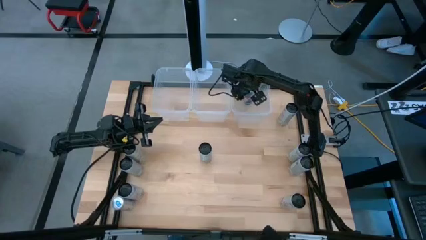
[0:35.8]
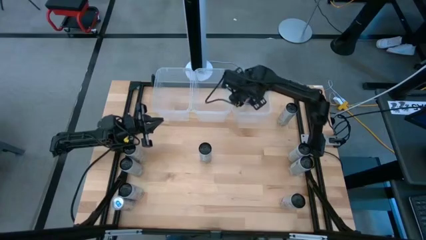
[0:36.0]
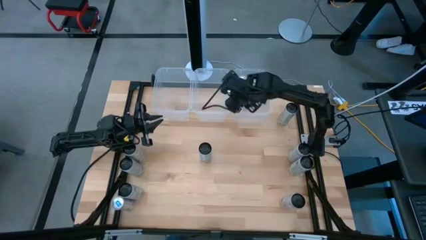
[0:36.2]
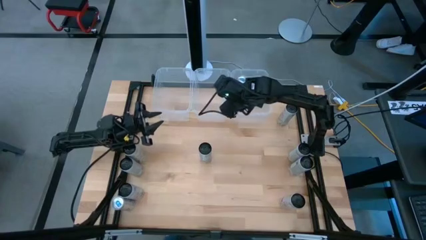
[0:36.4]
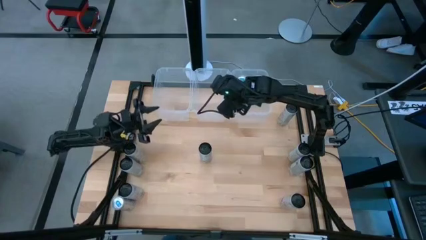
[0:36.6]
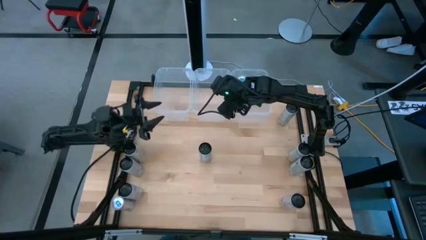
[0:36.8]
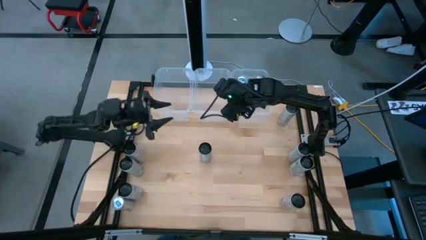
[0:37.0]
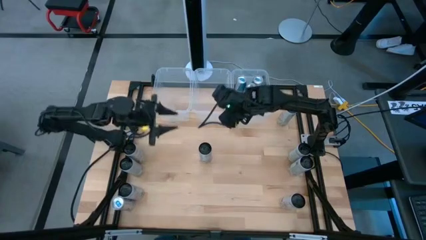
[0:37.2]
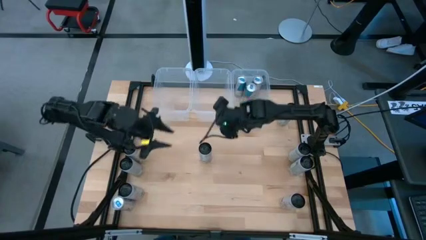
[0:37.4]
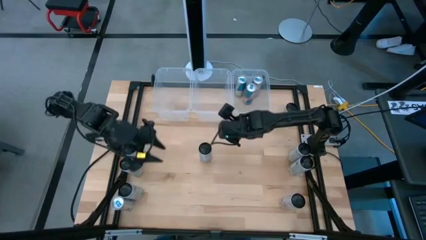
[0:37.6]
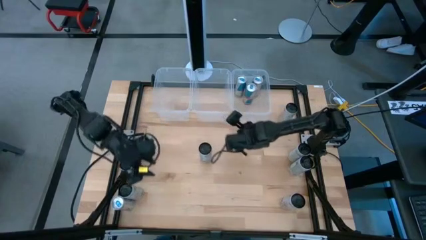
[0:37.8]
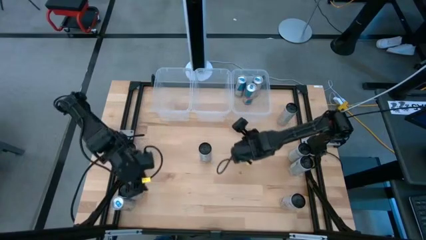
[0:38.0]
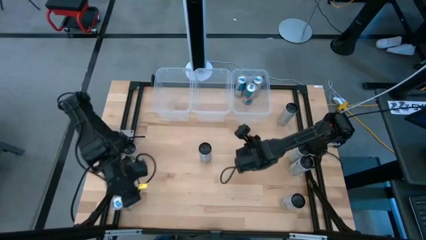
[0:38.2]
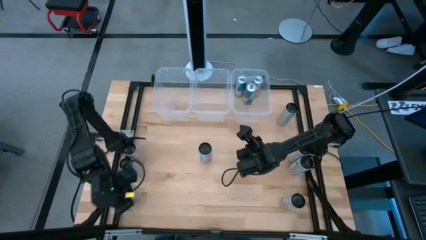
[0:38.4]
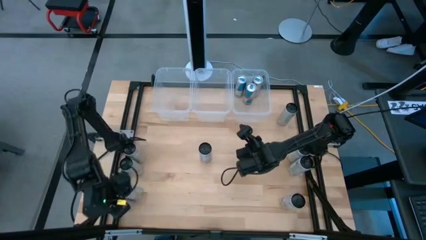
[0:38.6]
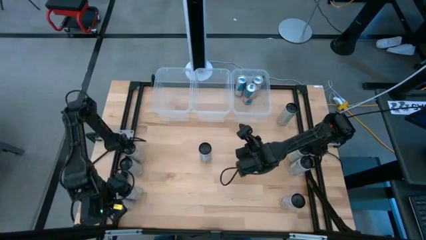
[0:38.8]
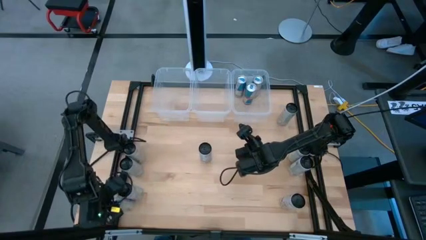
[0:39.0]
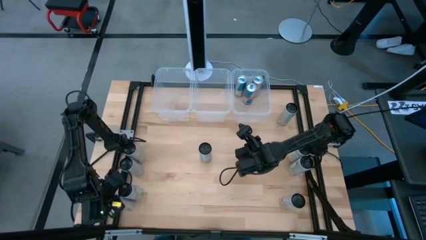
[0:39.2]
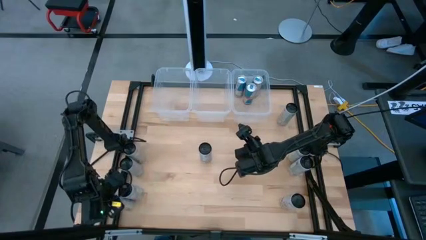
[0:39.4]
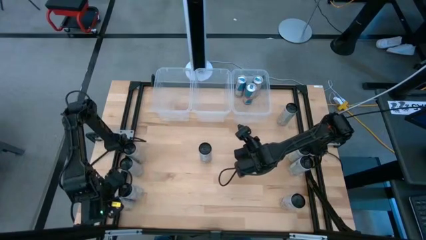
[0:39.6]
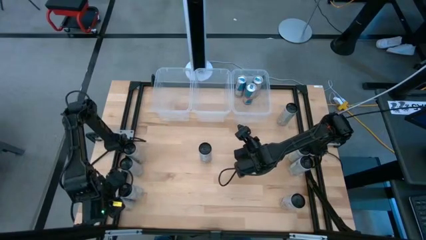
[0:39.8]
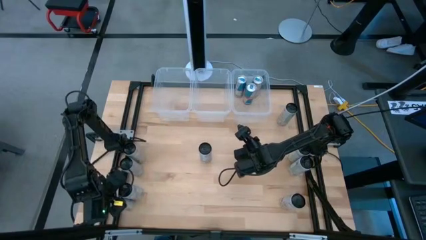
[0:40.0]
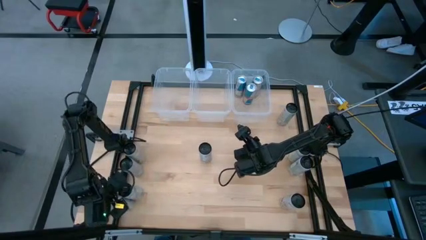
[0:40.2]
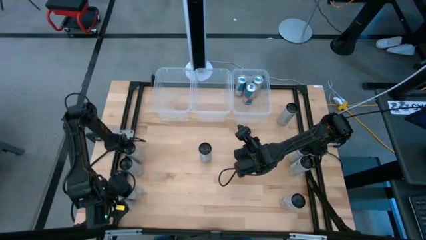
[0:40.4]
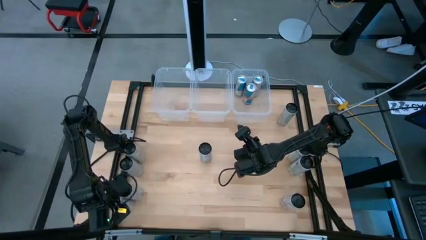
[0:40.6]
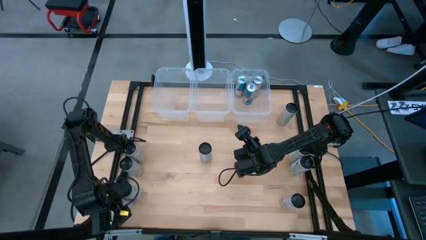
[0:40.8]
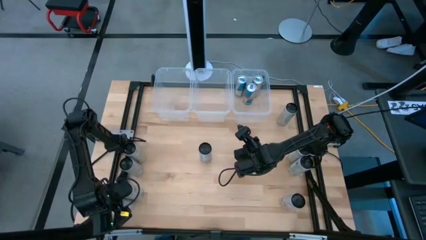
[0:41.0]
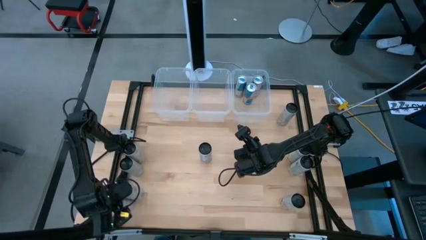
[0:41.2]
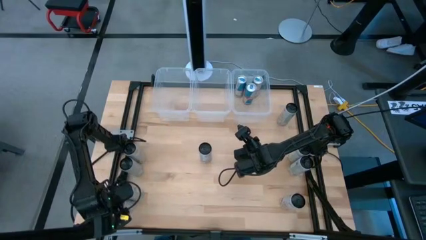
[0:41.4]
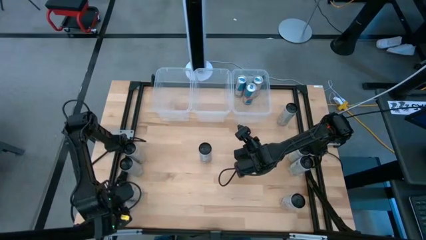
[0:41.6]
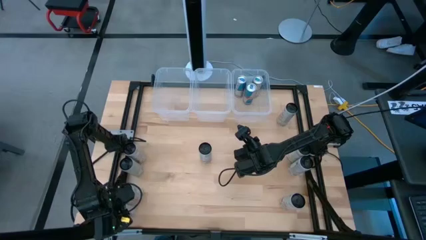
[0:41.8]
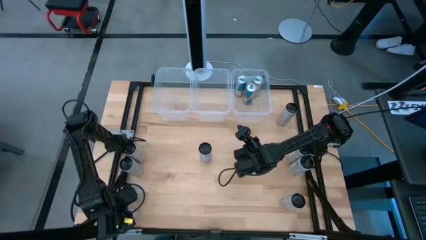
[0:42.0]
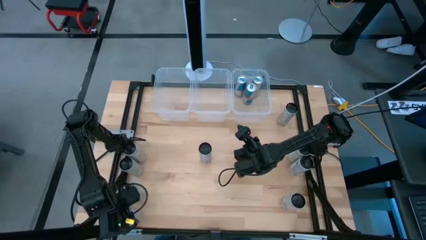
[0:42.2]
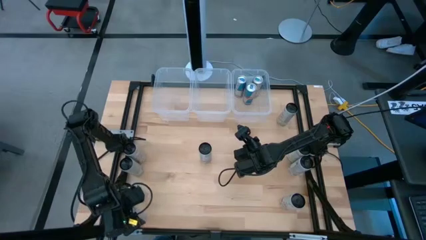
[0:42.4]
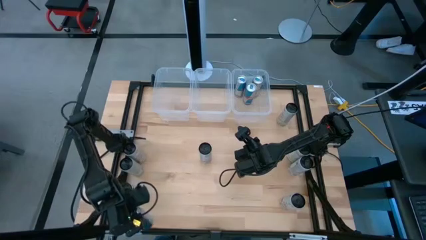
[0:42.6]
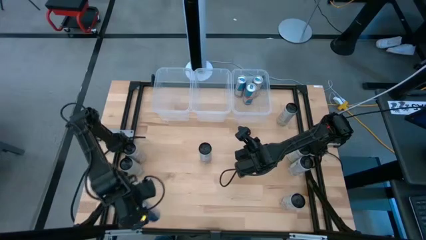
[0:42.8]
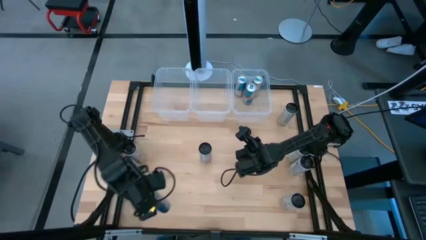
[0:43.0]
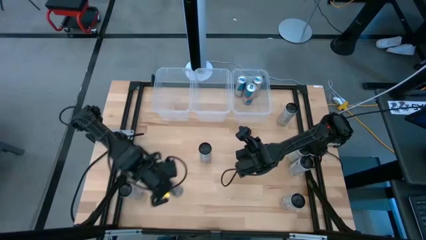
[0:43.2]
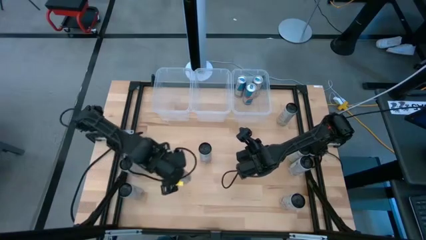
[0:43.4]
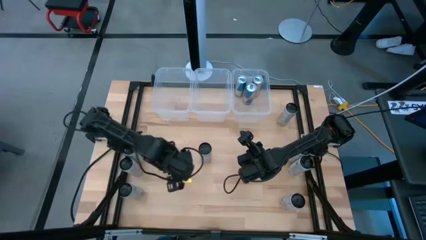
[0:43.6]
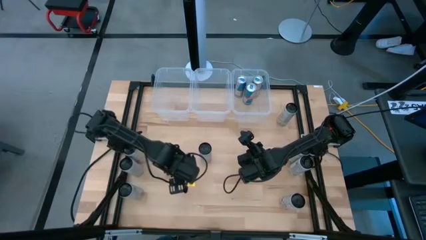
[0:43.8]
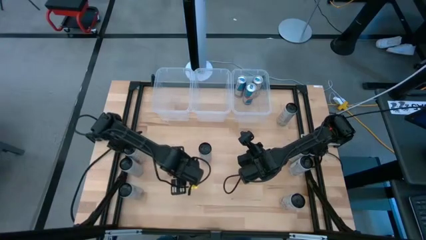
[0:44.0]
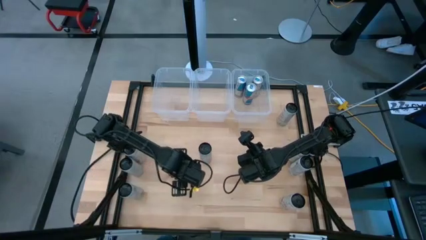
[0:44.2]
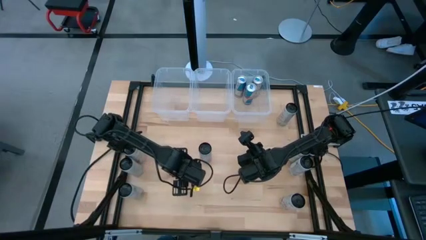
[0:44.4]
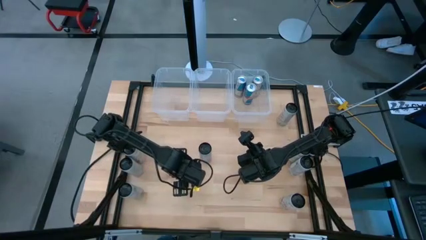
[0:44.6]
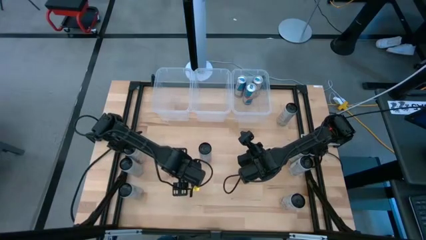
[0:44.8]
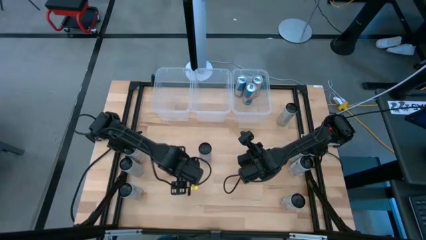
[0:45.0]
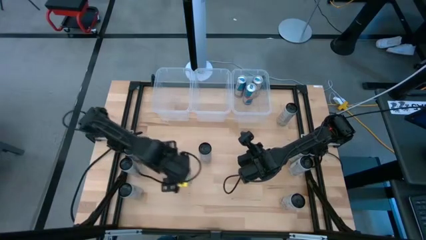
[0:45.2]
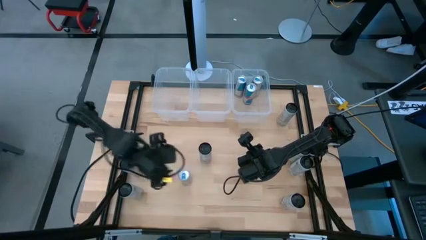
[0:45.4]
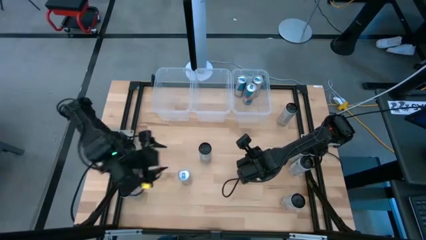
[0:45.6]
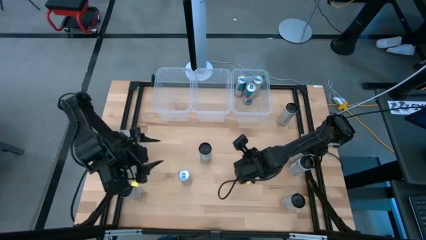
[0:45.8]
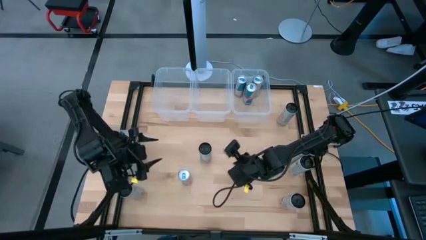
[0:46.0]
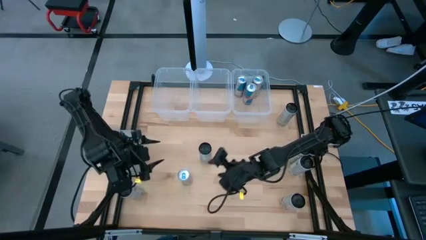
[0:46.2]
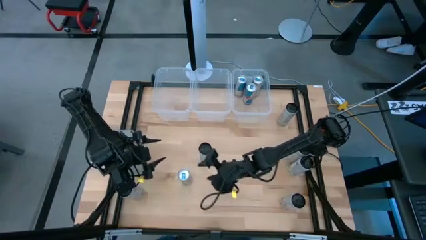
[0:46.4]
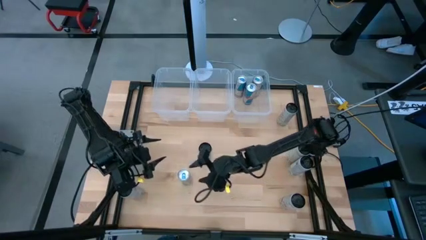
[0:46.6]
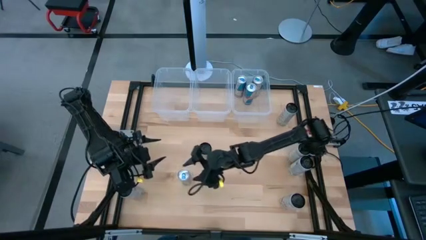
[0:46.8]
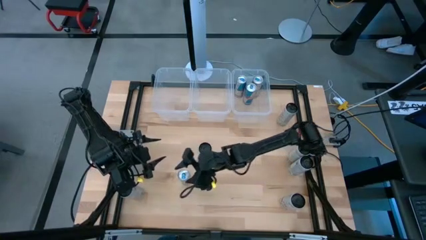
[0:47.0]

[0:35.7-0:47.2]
Task: Sort soda cans
Put the blue soda can into the right transparent bin

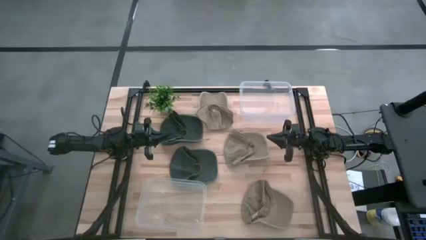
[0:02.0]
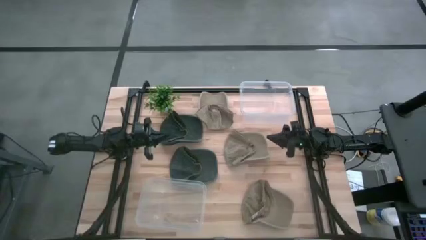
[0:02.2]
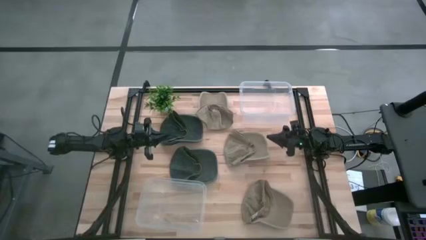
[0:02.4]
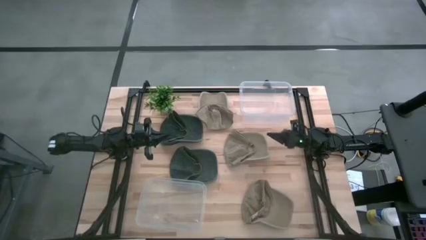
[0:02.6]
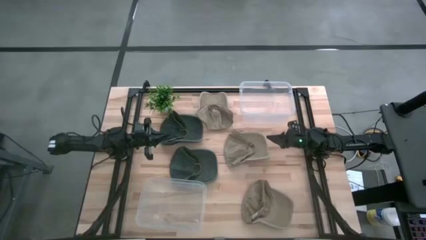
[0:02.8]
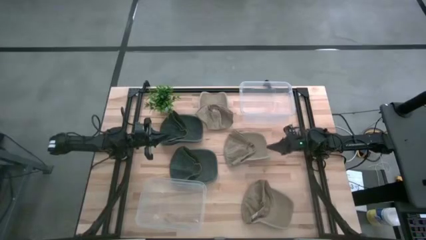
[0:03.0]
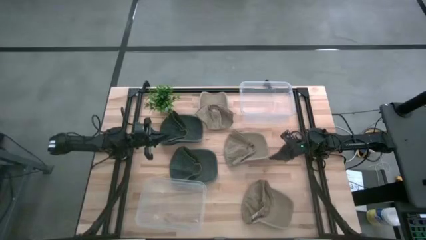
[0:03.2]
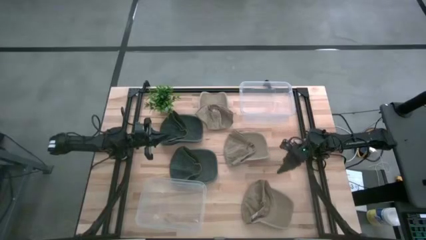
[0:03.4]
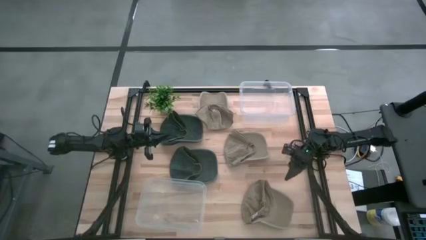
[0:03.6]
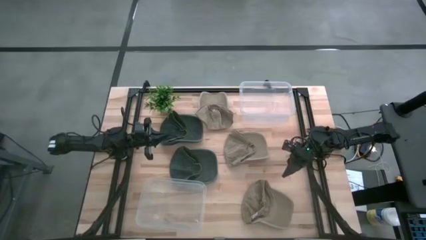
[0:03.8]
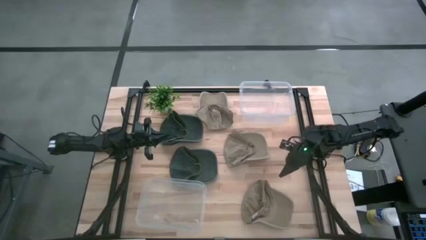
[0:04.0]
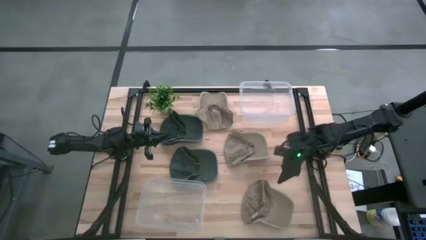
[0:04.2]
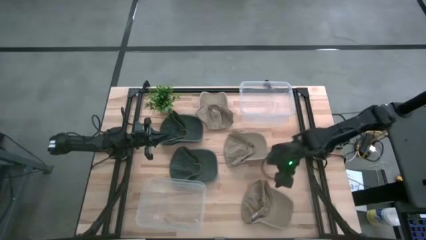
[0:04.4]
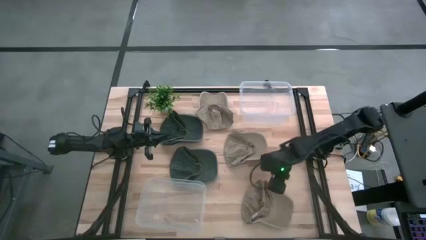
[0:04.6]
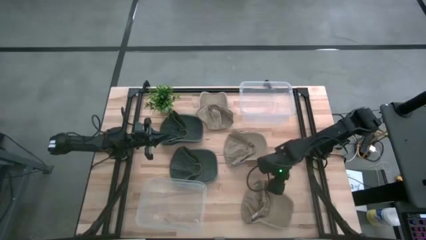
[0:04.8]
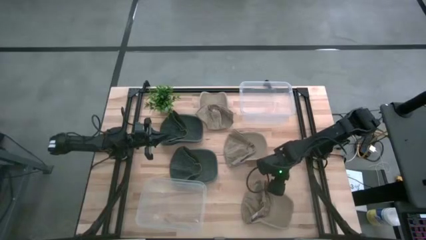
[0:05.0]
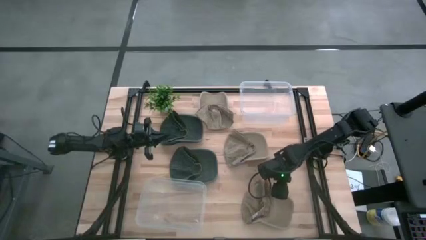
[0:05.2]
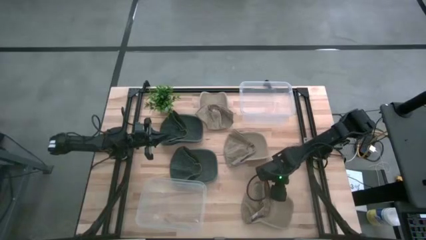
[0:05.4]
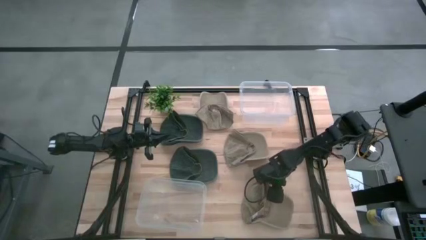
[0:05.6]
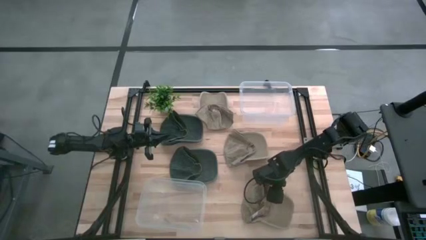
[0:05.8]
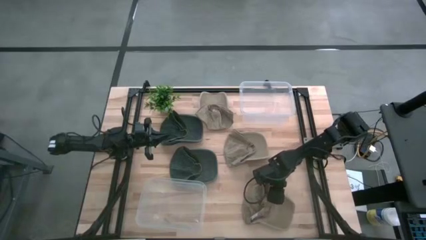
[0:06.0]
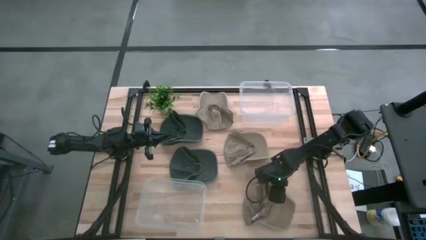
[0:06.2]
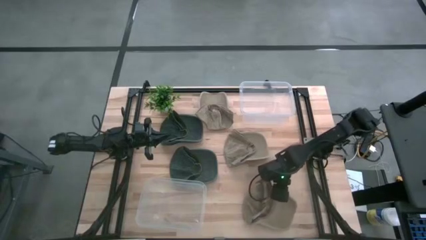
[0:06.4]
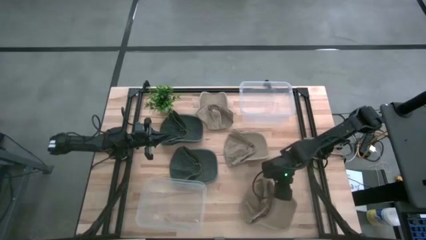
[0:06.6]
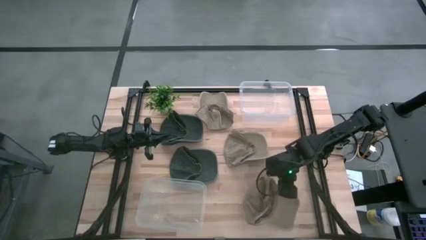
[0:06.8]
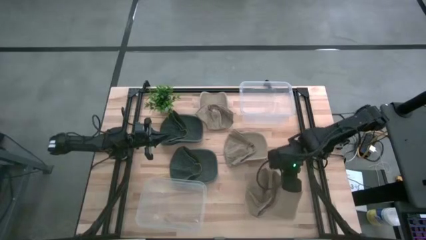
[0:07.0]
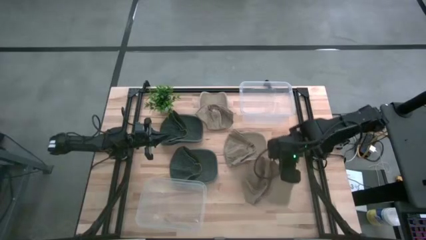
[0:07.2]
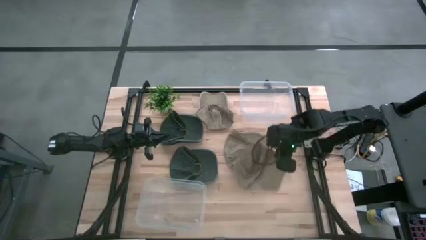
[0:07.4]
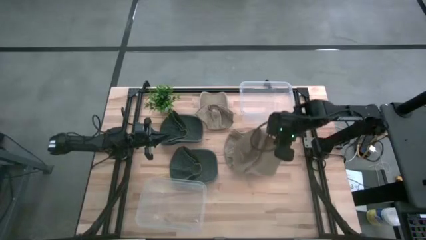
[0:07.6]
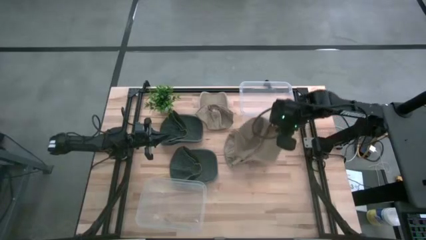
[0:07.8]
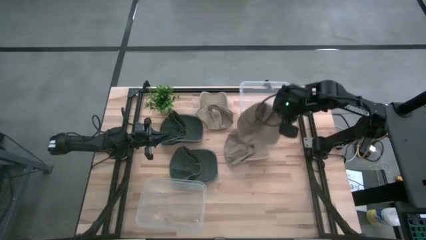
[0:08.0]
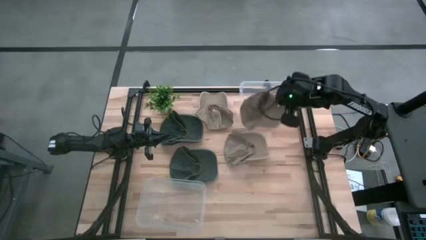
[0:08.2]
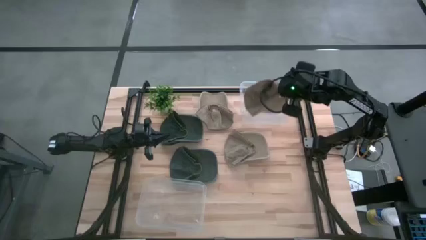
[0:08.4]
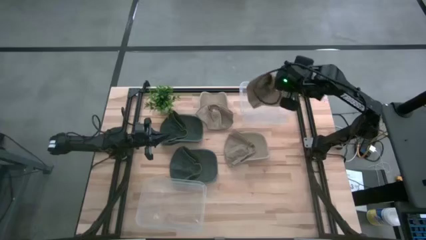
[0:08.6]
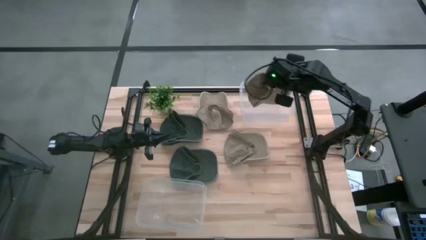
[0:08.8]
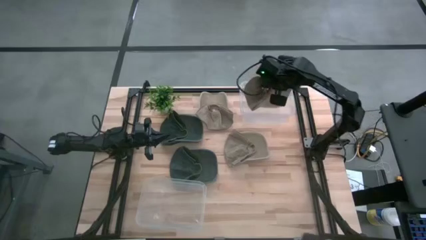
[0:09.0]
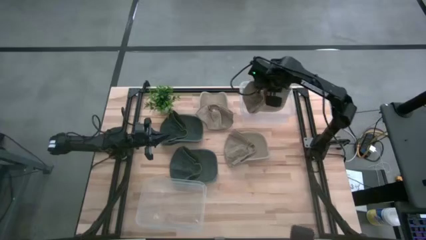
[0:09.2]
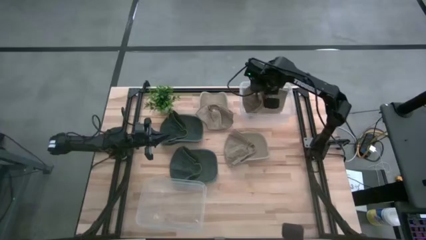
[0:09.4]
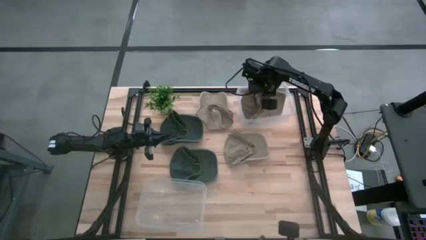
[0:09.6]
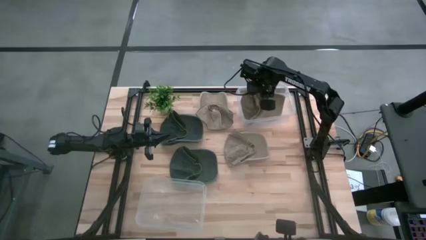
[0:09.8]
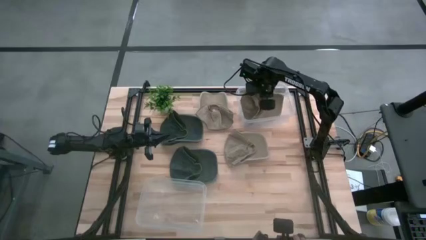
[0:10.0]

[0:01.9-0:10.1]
Task: Pick & Place hat
Put the bottom brown cap into the top transparent bin
